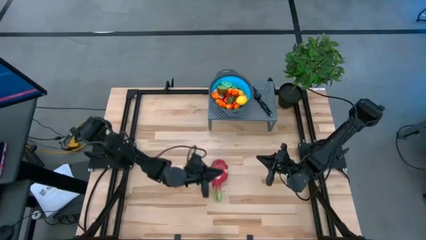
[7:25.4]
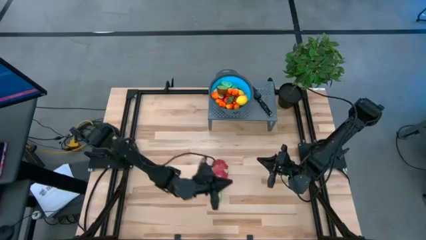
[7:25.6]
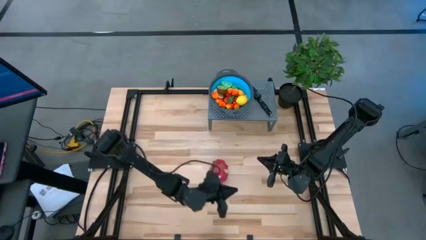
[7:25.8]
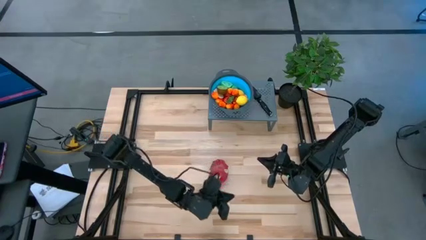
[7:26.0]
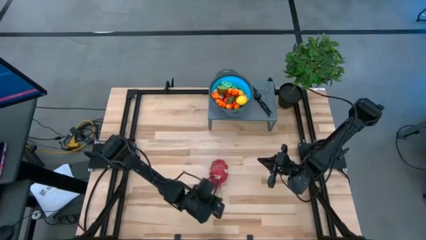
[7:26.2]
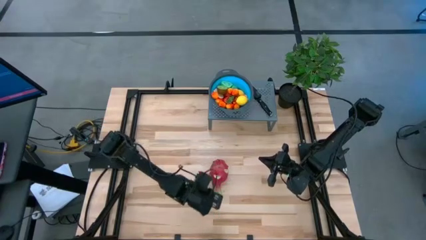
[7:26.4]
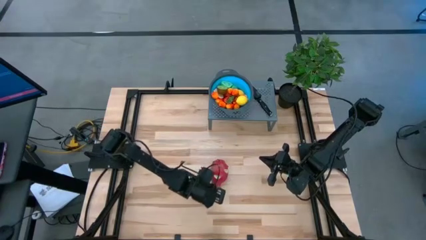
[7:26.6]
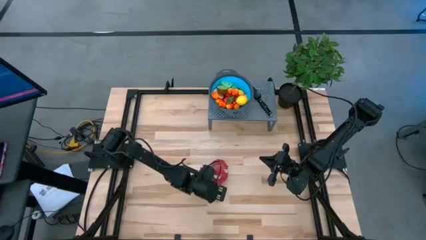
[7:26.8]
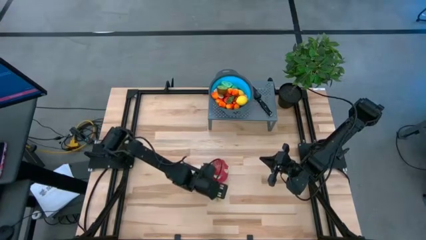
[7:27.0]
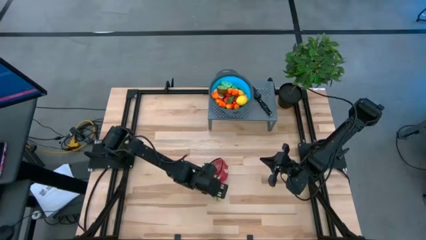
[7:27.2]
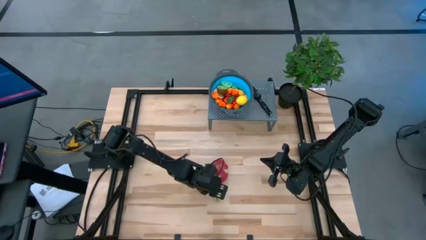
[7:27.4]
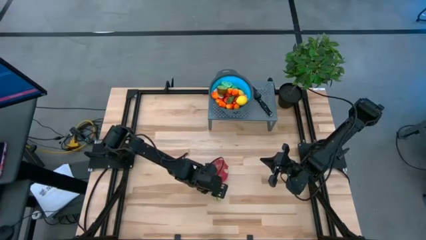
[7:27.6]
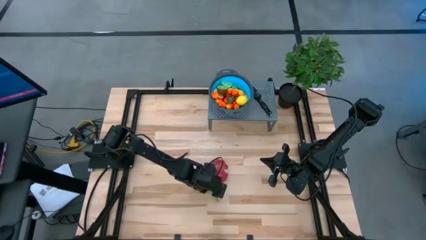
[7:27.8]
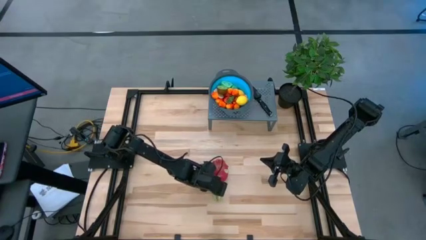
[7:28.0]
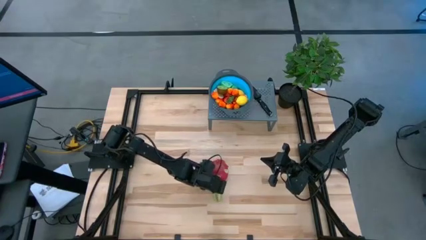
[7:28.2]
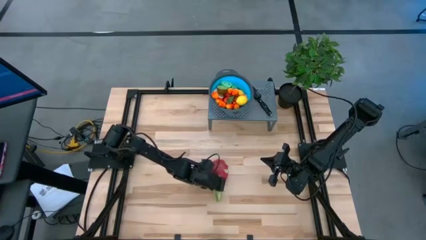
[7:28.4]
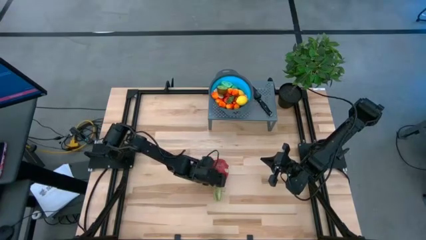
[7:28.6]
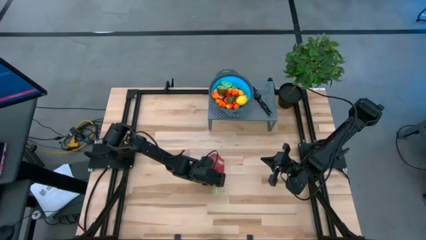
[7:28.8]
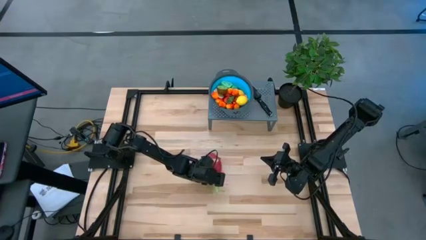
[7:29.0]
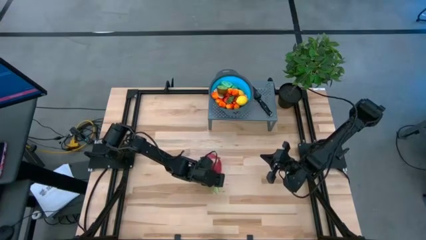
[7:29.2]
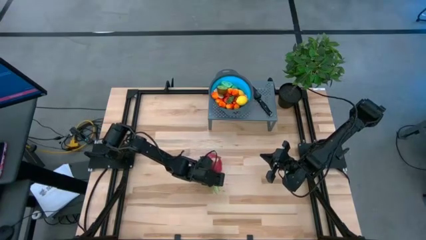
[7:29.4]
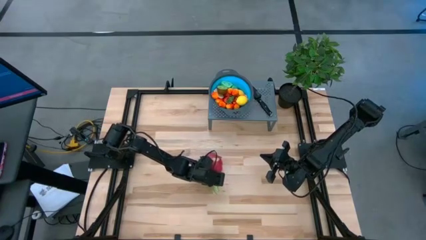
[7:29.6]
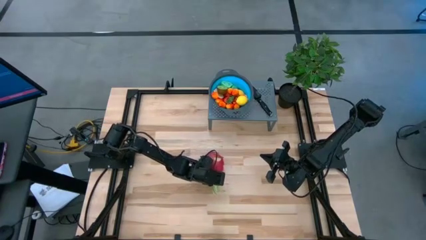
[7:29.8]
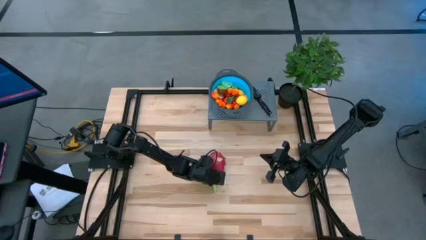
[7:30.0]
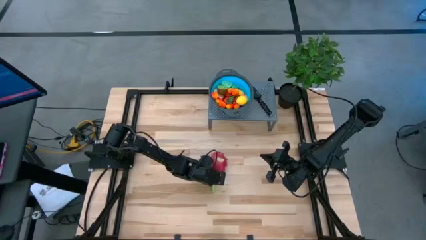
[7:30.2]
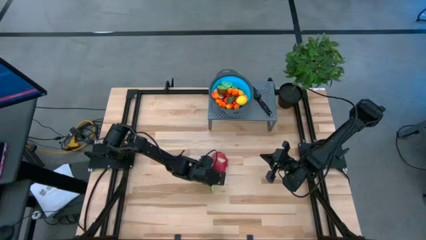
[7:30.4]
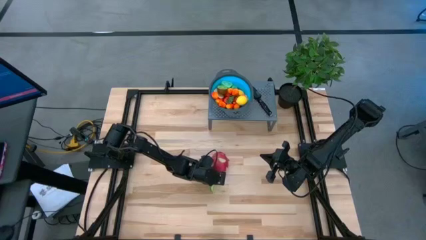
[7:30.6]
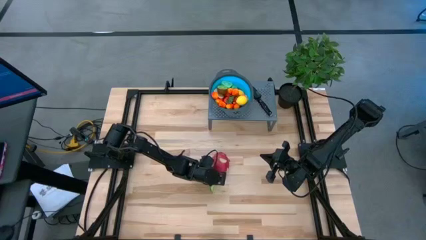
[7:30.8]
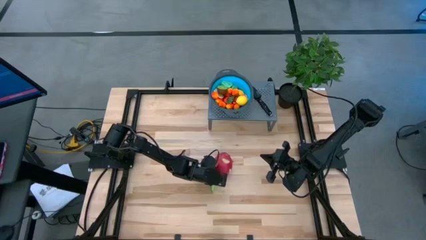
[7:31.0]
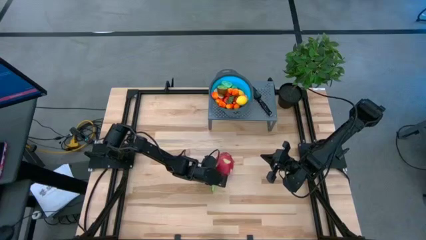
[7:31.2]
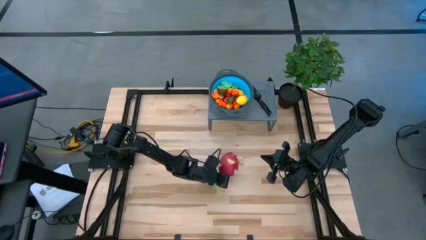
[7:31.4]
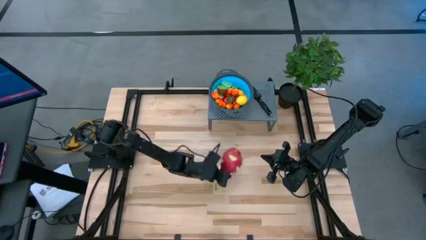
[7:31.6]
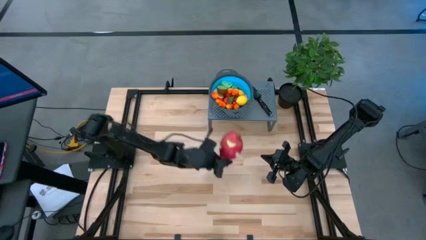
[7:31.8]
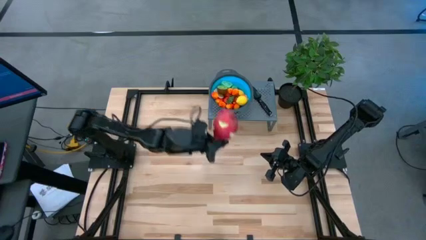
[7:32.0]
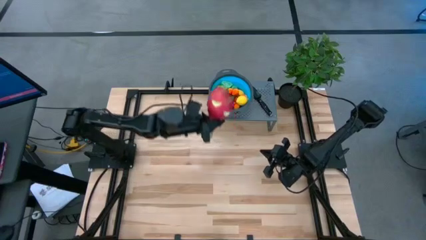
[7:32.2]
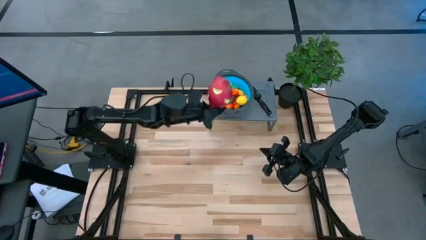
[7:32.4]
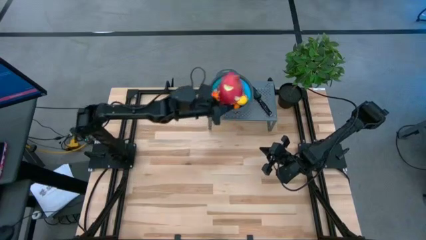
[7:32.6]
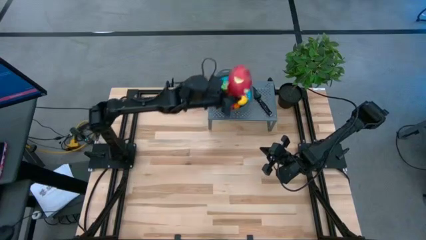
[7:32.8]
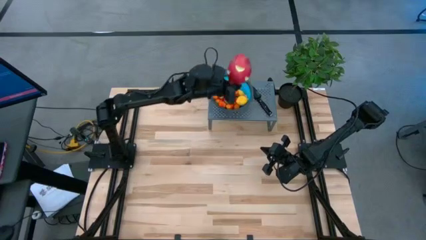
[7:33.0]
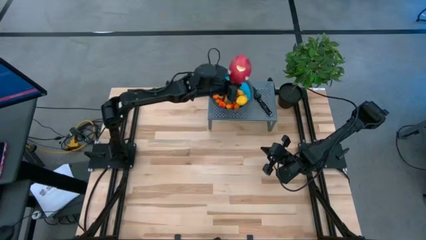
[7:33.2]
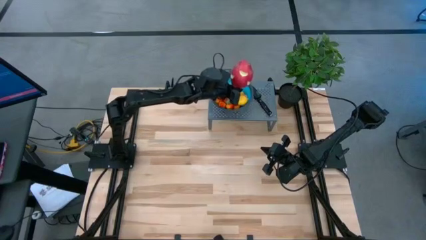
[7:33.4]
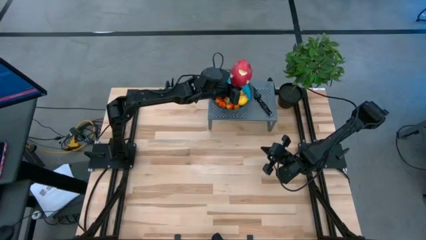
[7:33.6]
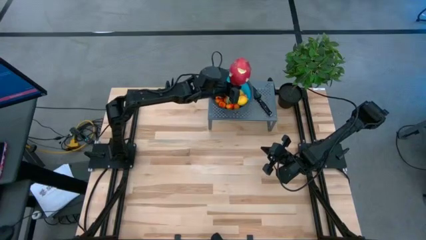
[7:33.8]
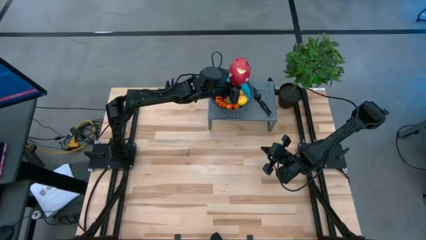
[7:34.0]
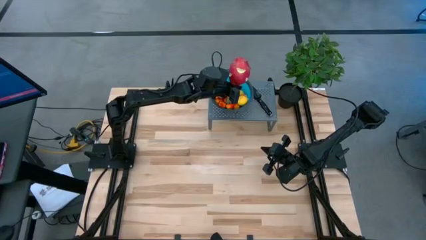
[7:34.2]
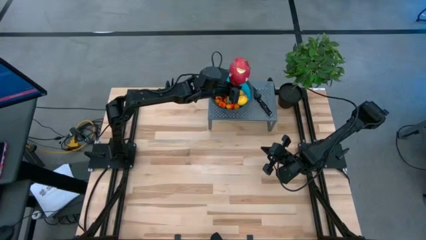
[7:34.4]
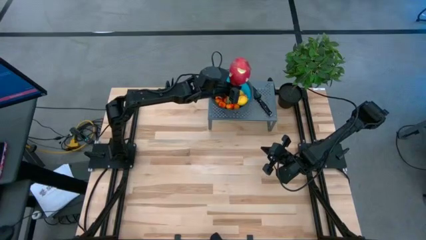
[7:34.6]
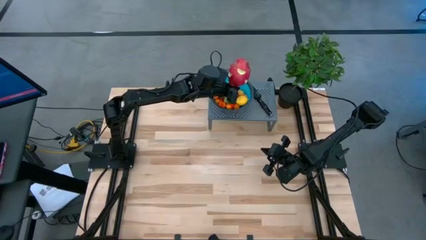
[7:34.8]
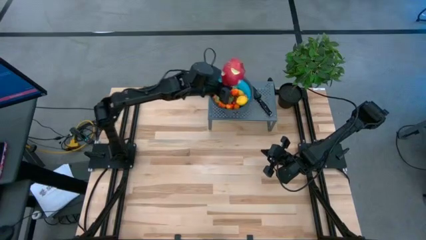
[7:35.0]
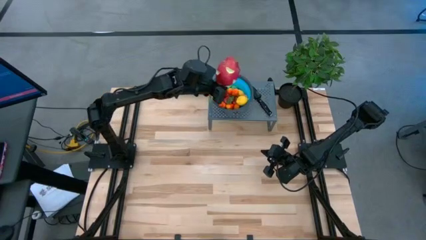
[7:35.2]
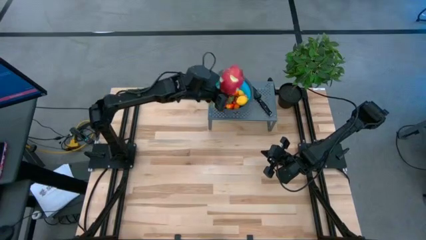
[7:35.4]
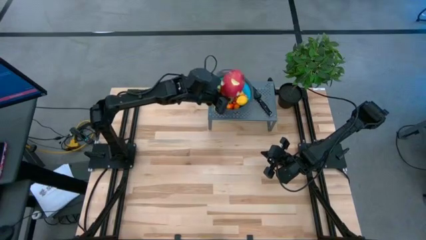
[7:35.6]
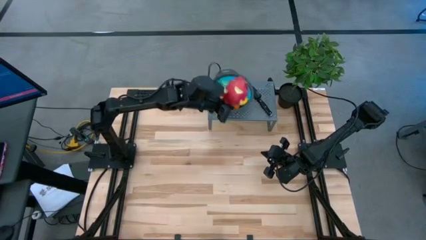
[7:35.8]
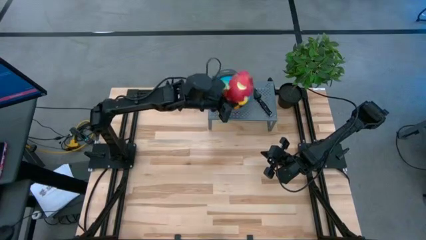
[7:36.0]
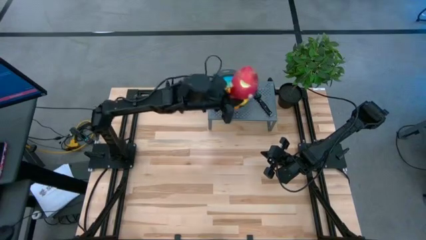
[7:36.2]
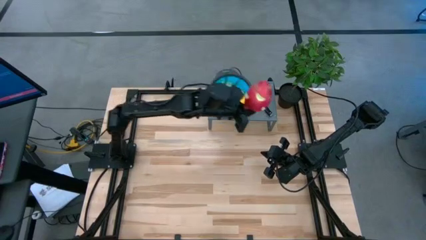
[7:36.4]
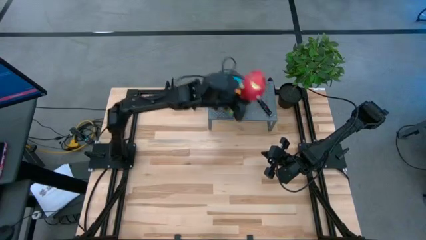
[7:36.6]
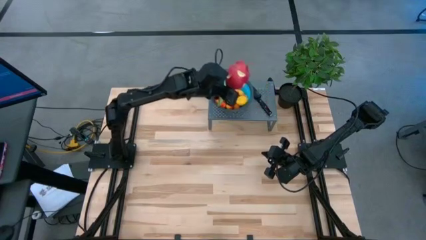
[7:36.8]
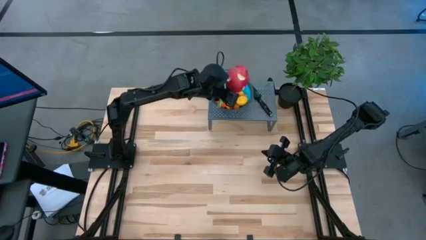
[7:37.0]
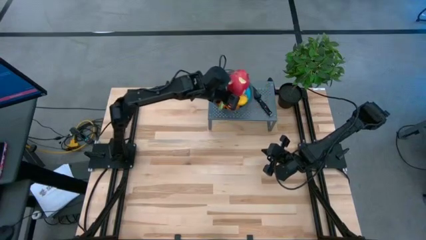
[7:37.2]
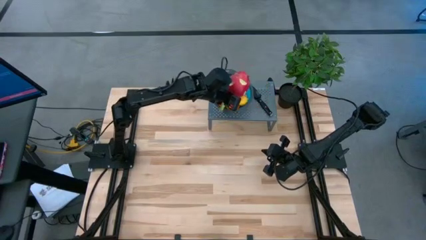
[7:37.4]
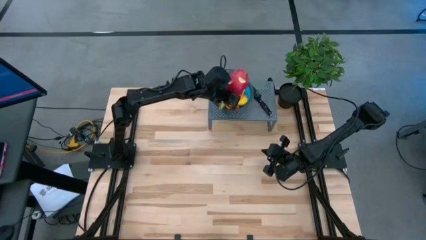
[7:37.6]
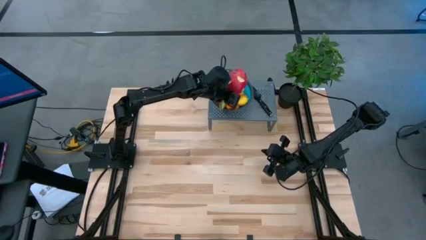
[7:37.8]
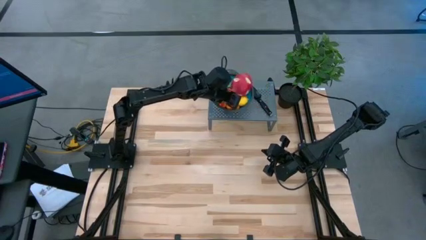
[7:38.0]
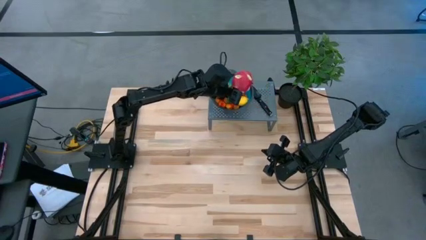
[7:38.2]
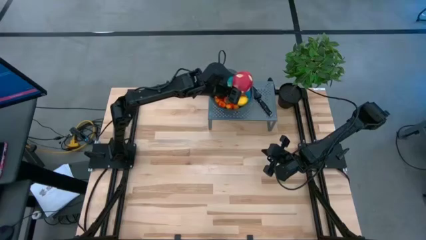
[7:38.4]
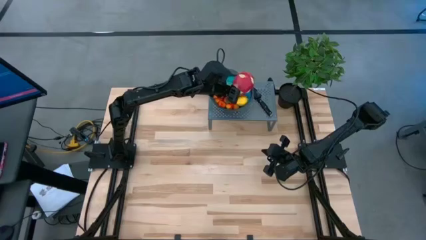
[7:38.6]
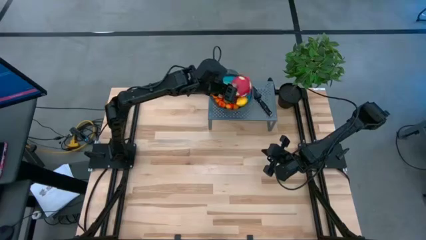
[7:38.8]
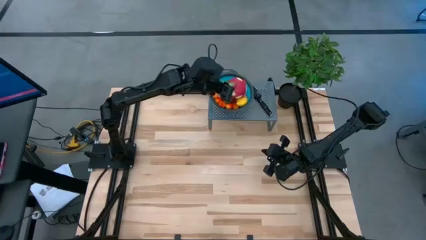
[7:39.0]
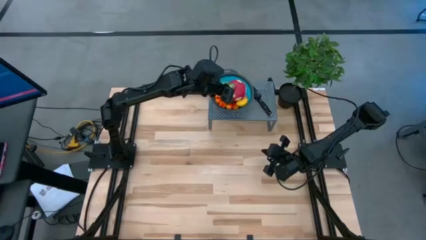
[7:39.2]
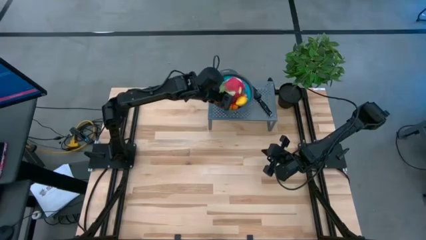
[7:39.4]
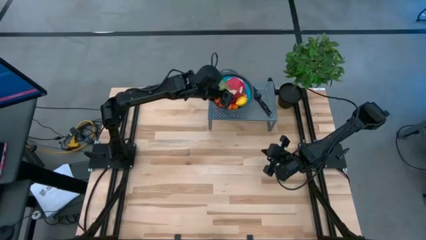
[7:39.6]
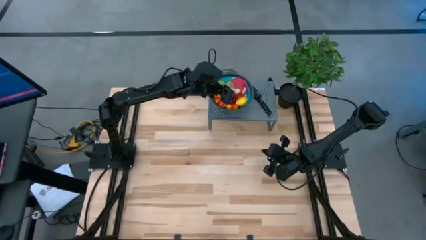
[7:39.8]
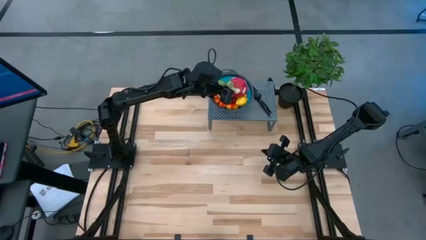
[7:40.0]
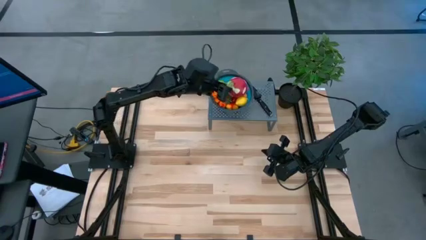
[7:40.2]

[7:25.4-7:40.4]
Task: Pick & Place Fruit
Put the dragonfruit into the strainer bowl

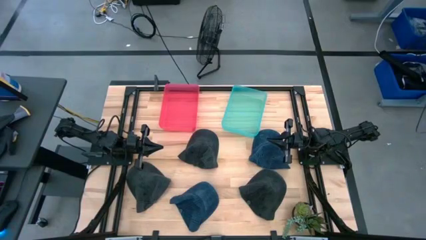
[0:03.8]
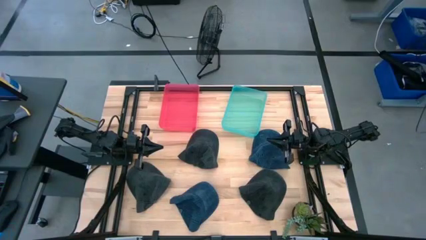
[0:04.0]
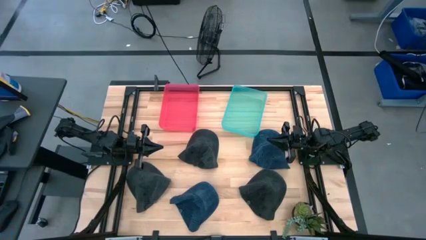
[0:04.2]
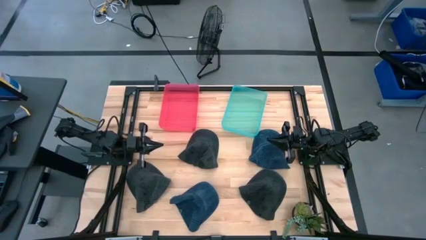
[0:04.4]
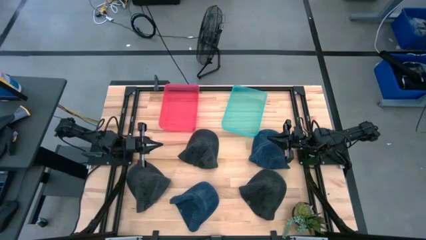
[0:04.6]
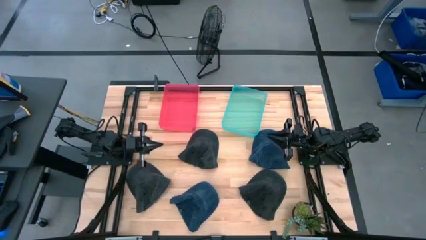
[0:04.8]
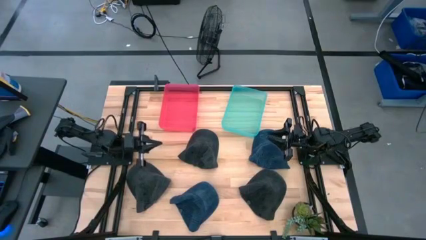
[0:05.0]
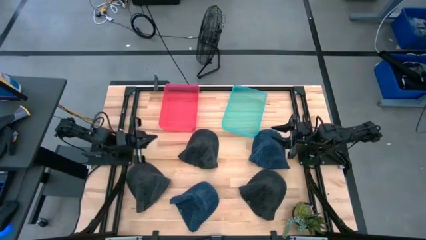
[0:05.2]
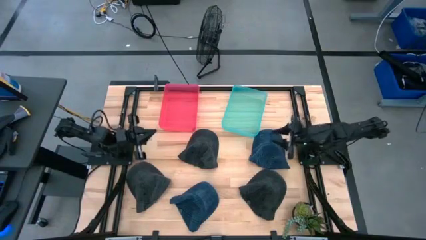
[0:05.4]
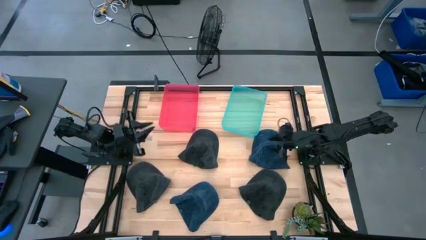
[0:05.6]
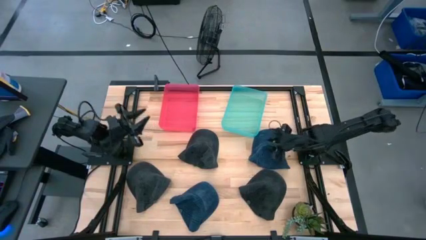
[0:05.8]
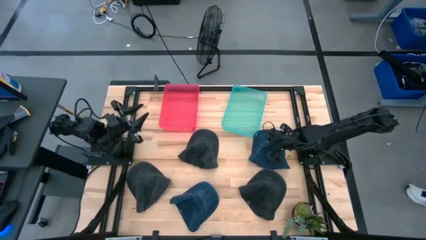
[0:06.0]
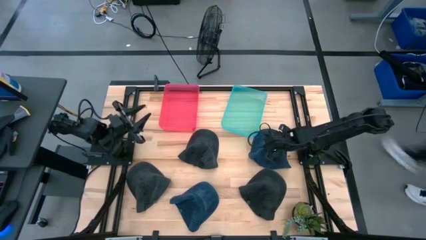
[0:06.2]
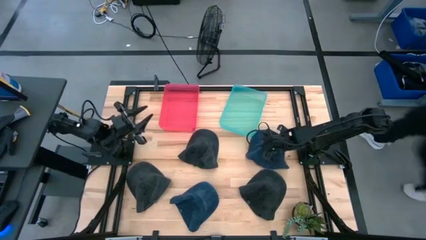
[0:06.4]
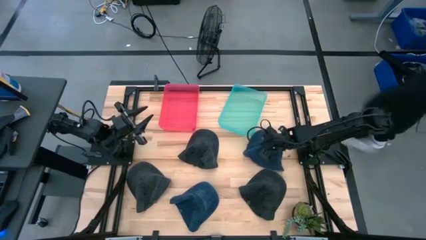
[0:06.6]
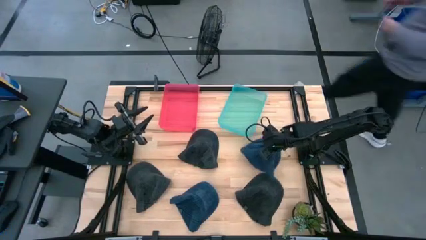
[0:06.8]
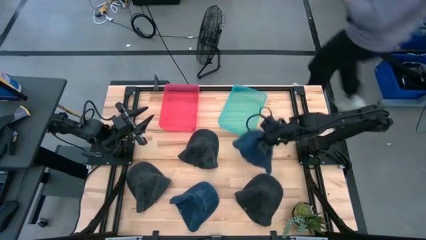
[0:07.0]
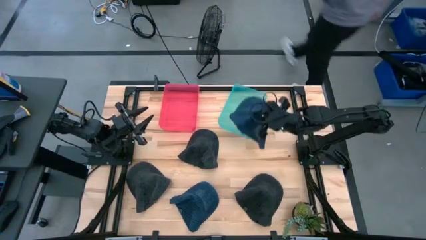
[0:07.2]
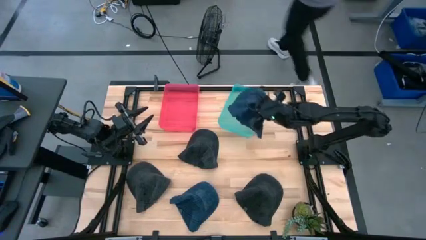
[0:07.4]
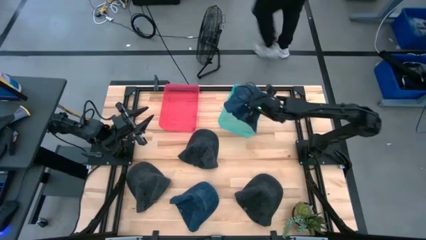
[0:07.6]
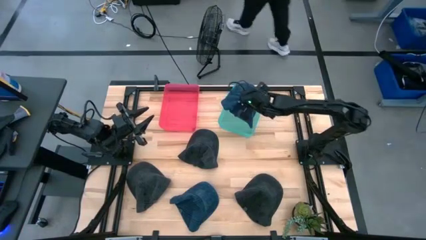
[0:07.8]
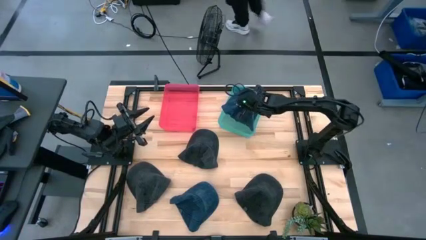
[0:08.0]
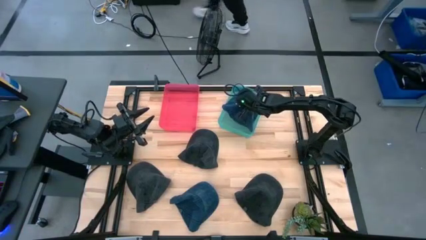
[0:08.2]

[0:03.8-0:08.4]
Task: Pick & Place hat
Put the top blue cap into the blue bin
